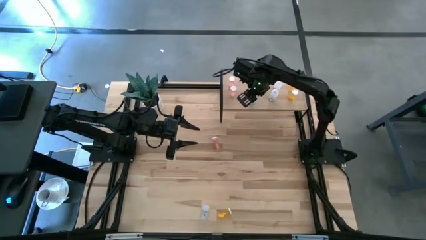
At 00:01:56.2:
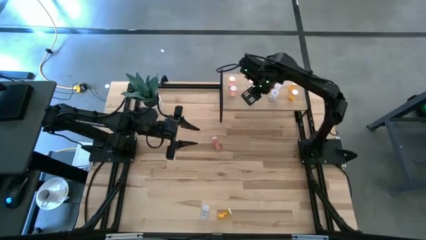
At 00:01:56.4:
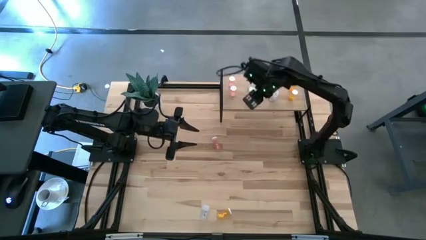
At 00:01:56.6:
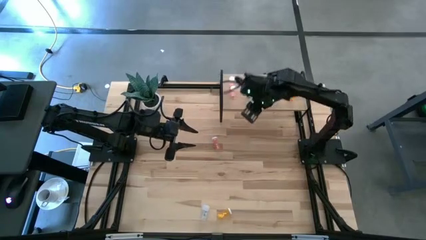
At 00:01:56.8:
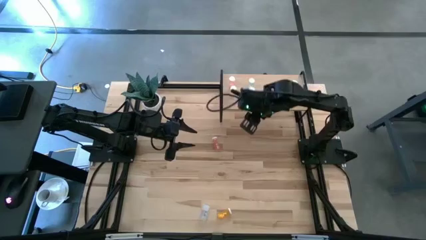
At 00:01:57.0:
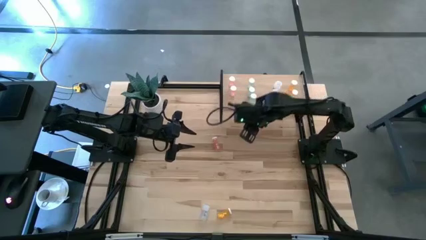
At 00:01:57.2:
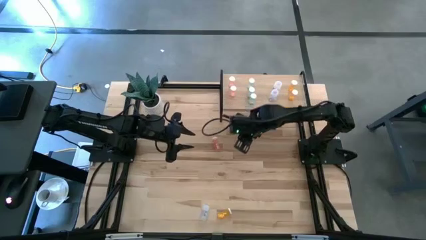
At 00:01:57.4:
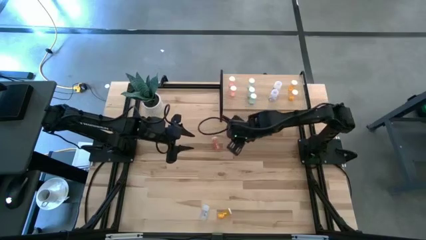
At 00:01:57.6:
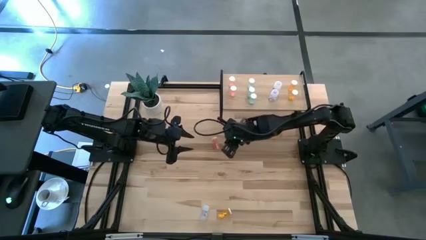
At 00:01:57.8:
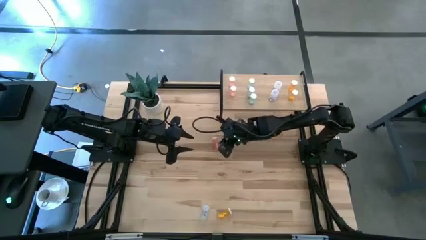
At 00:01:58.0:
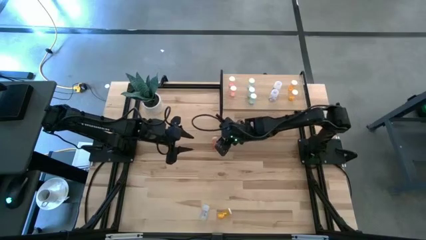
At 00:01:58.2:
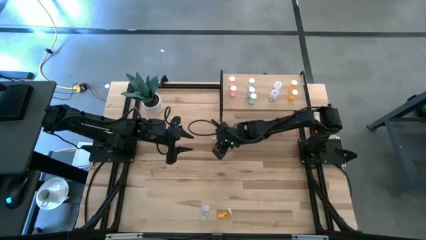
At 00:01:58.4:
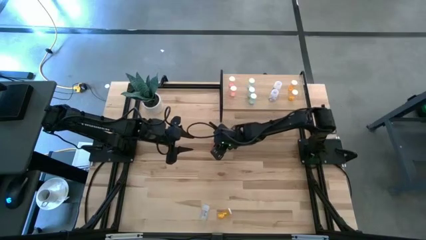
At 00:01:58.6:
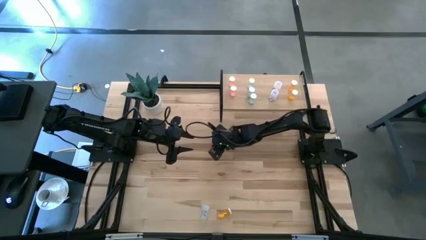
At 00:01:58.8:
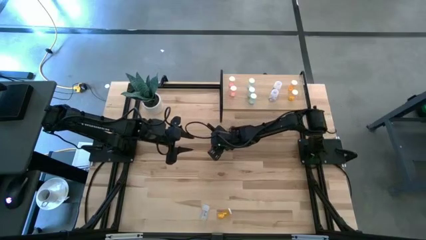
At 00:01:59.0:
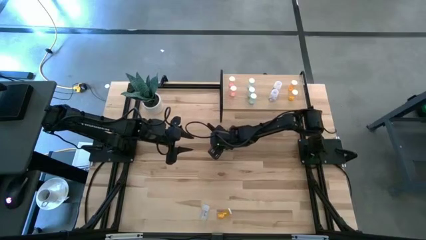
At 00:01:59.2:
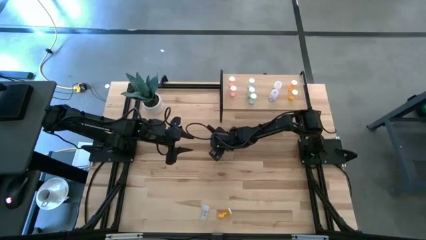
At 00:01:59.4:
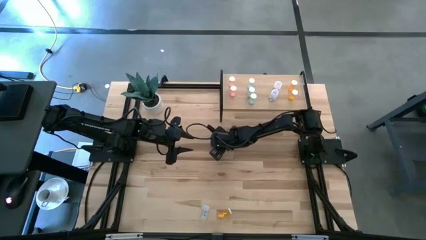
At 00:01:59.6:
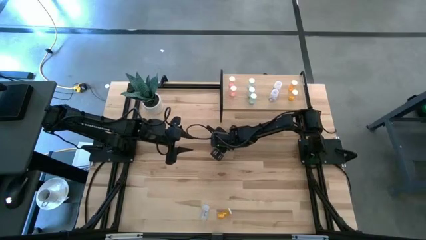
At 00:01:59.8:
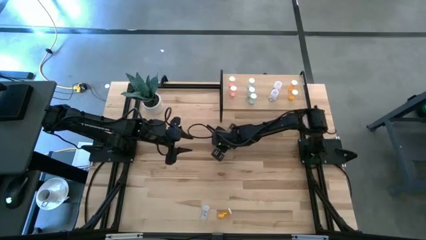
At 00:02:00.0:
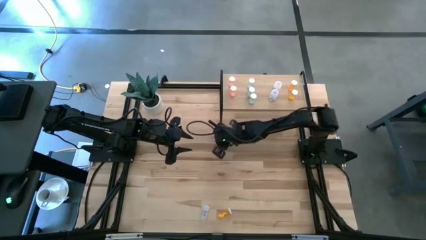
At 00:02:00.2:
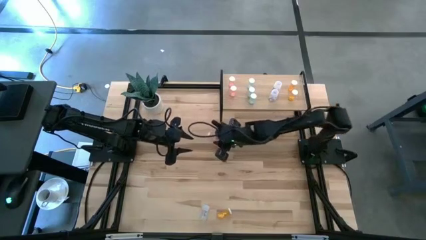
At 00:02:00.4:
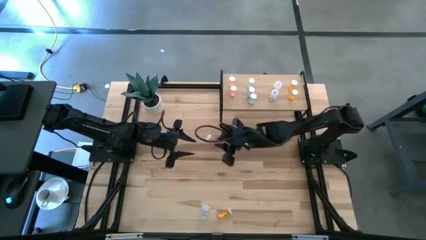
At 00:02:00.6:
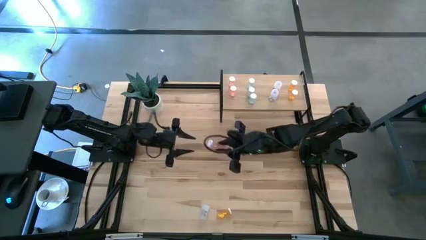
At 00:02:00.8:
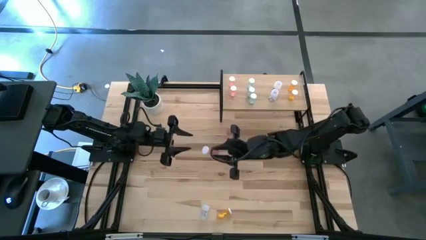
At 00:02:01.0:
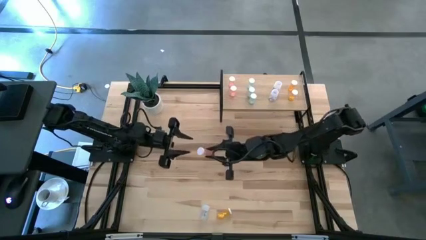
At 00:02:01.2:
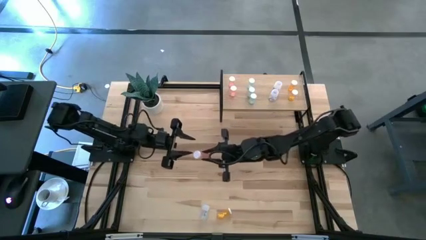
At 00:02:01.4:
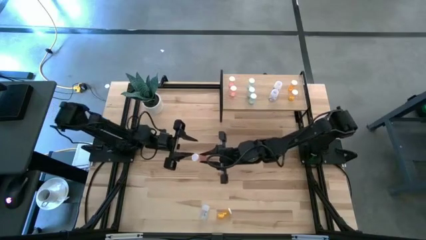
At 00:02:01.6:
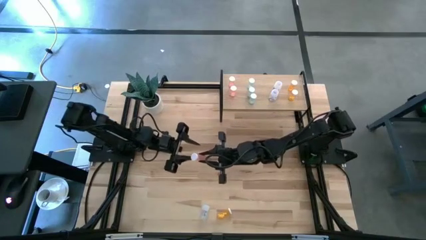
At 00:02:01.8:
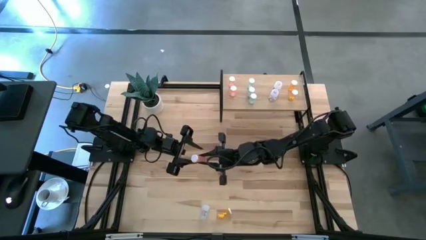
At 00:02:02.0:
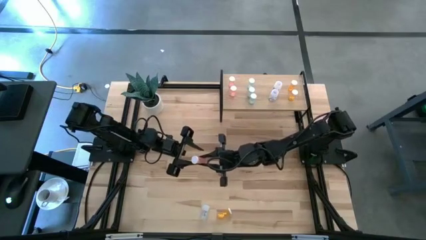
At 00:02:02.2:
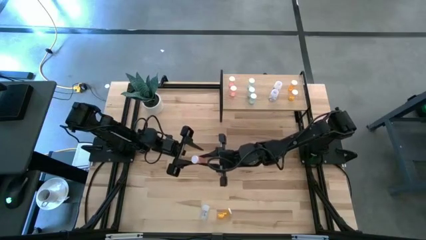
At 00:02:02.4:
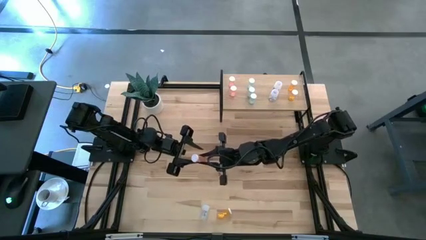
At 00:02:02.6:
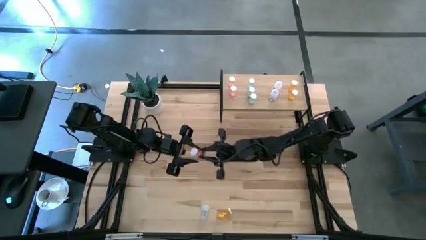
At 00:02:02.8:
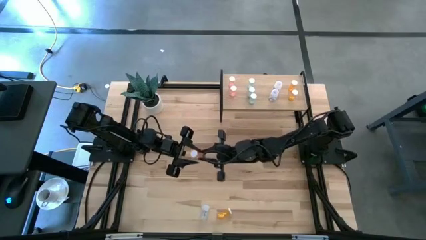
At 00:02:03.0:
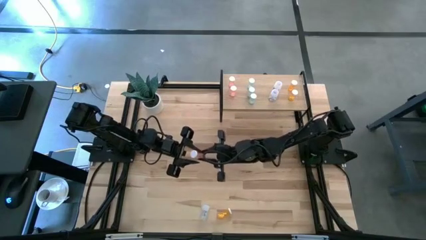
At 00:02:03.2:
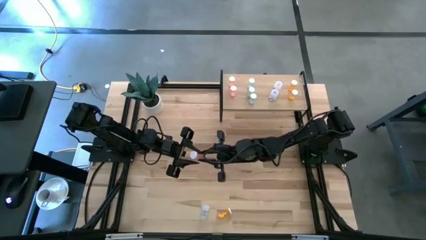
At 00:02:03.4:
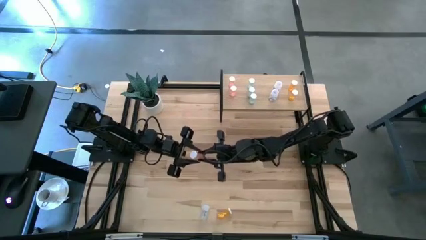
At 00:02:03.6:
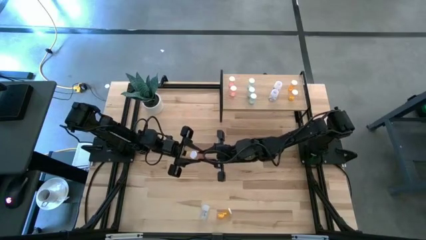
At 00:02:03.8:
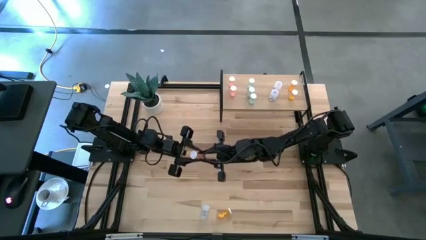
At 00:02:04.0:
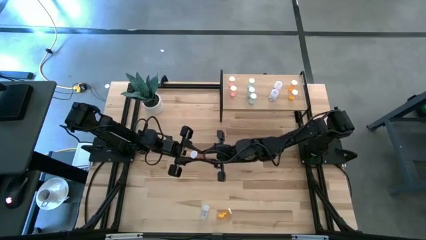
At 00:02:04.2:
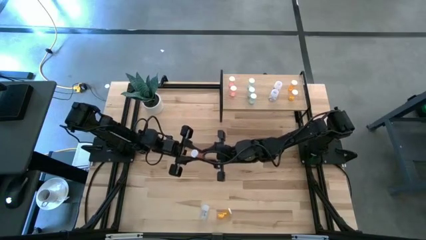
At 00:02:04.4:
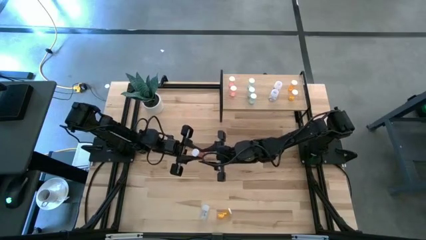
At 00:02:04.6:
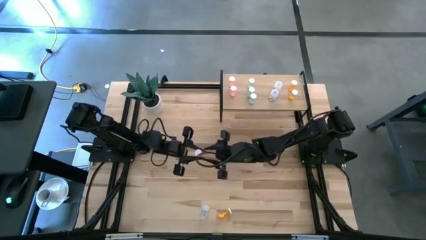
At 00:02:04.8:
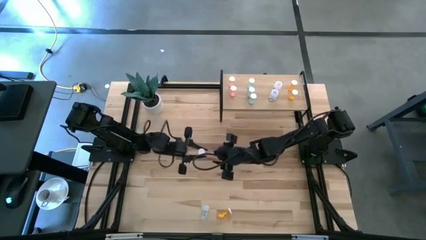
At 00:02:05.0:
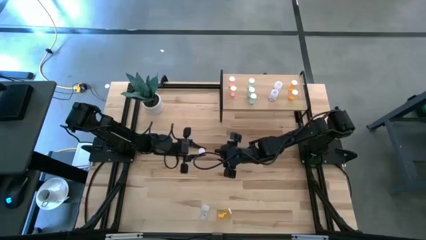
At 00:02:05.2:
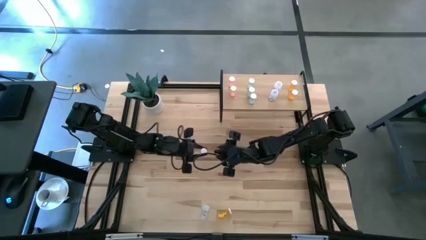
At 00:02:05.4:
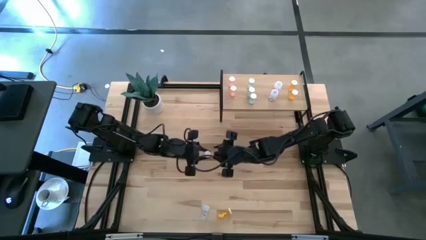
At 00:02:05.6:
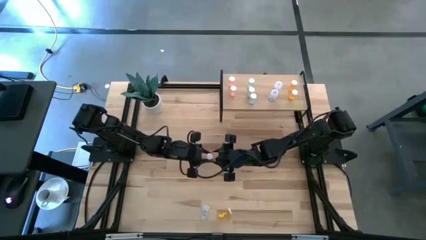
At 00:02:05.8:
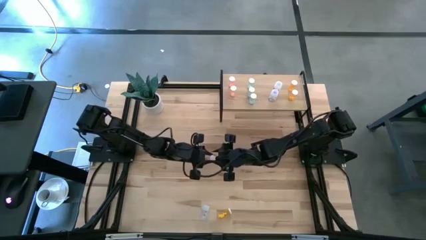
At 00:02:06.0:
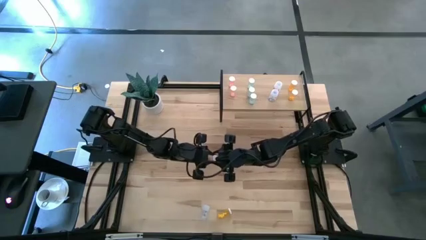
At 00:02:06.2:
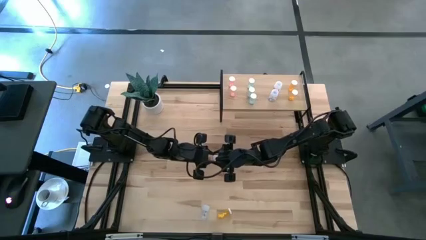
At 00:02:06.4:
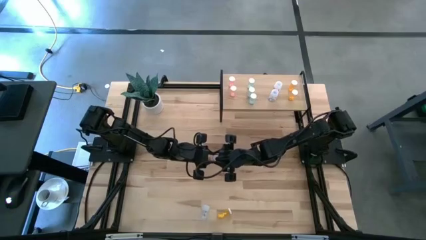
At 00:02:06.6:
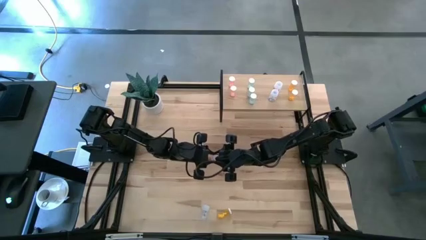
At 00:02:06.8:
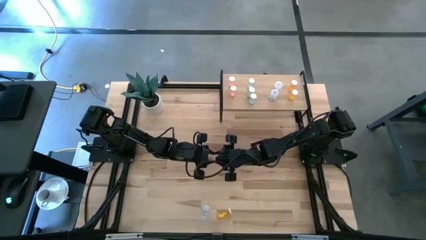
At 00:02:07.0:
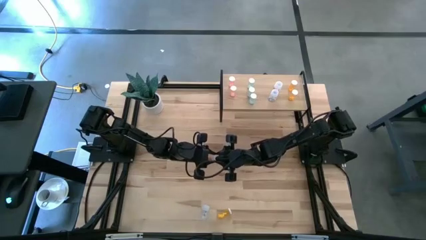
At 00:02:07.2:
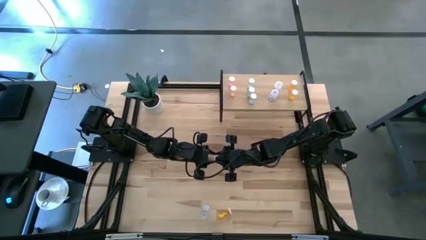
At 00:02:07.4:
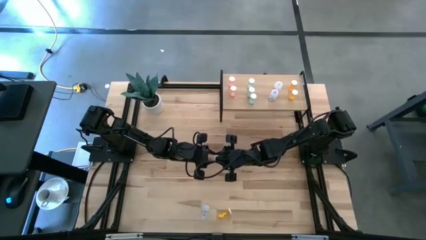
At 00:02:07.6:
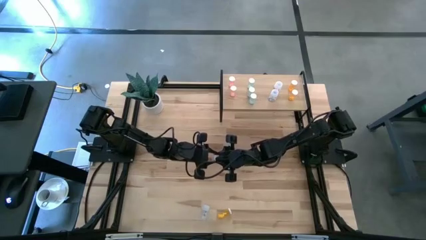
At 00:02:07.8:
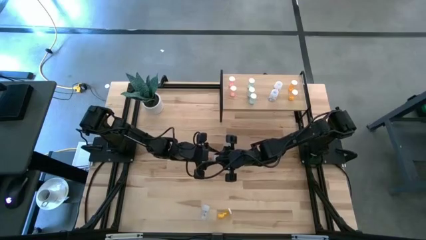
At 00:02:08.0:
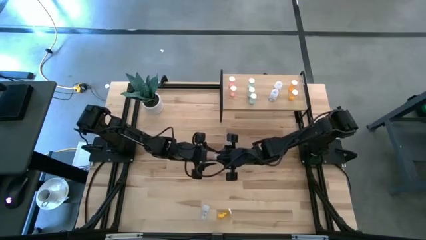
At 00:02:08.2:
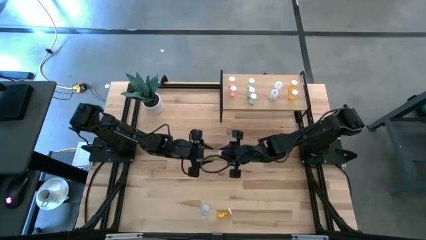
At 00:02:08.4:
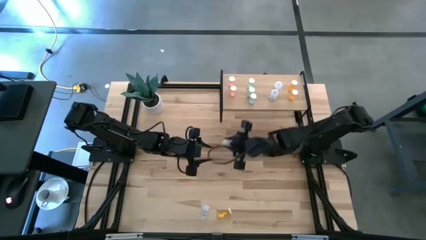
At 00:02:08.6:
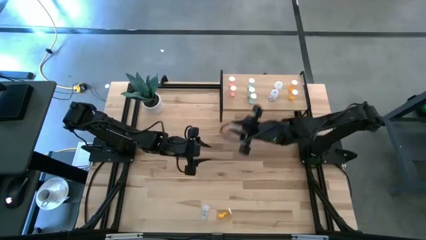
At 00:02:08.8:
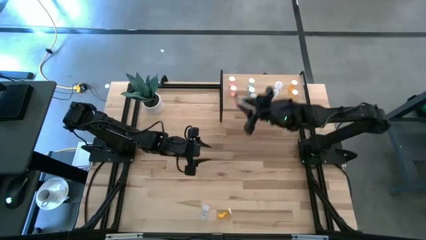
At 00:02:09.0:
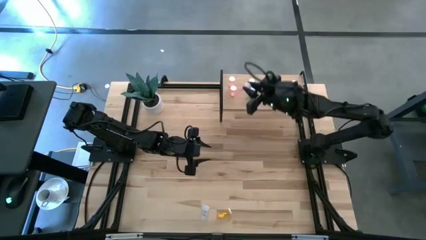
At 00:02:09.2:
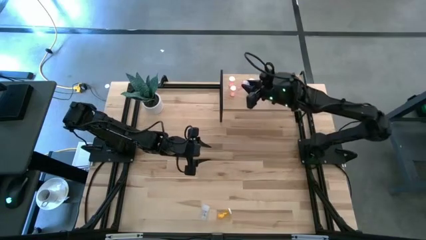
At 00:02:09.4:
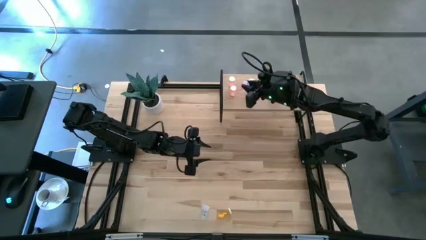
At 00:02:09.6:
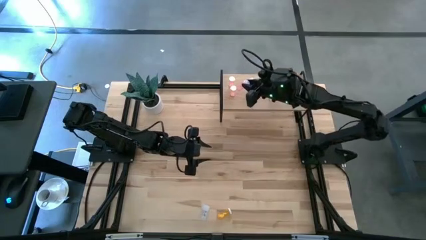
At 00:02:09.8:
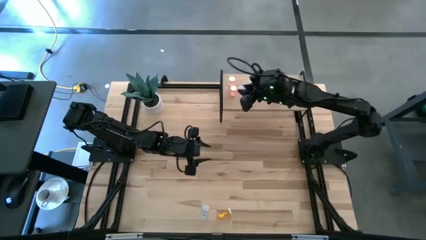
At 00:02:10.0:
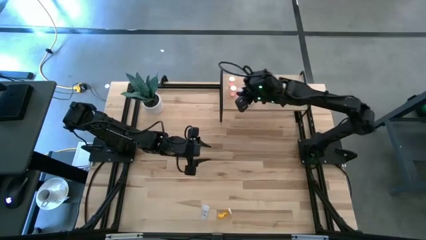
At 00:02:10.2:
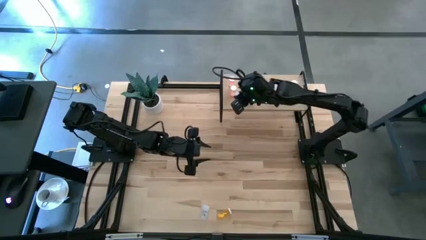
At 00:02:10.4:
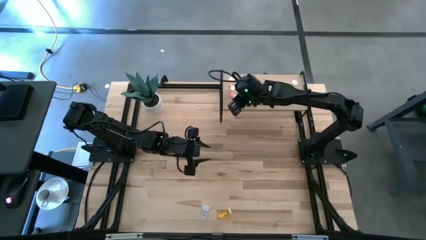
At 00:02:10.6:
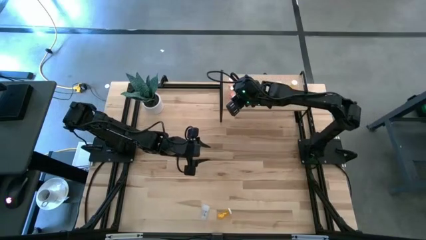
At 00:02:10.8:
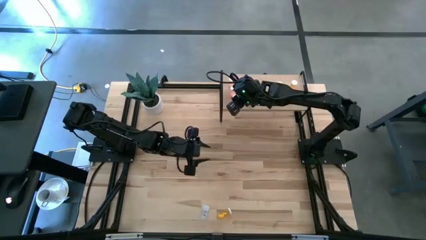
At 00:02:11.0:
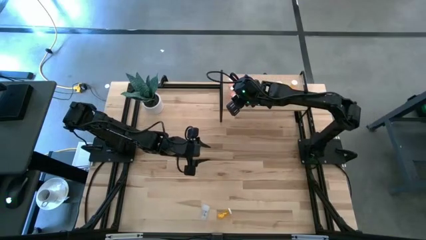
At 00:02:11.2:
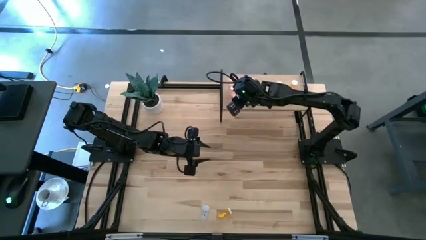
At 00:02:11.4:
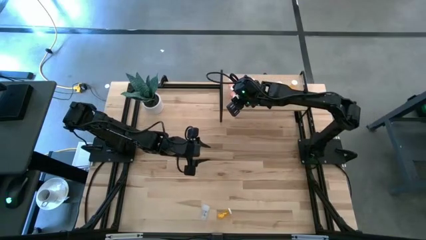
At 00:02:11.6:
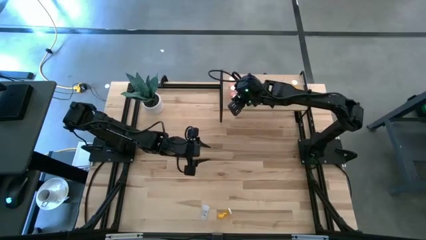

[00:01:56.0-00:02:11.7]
Task: Pick and place medicine bottles onto shelf by color
Put the red pill bottle on the shelf aligned with the other red pill bottles
